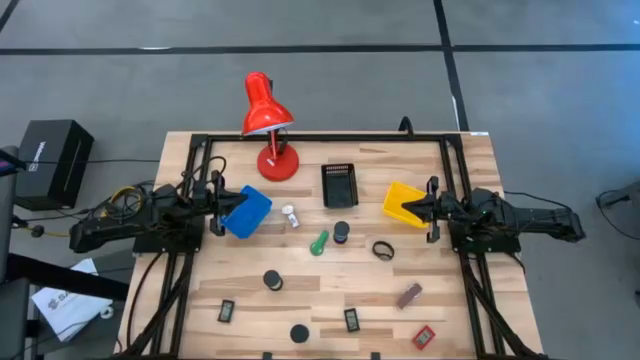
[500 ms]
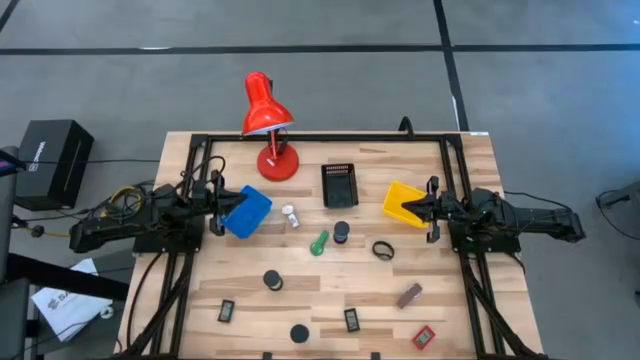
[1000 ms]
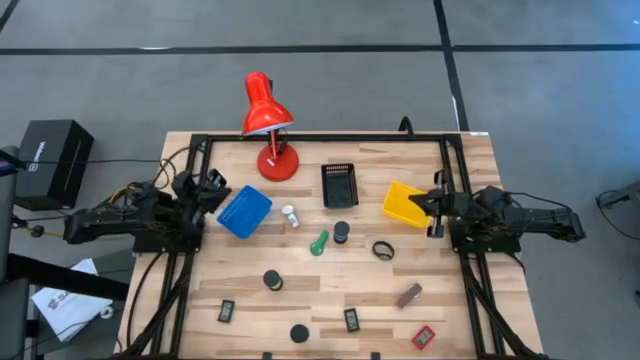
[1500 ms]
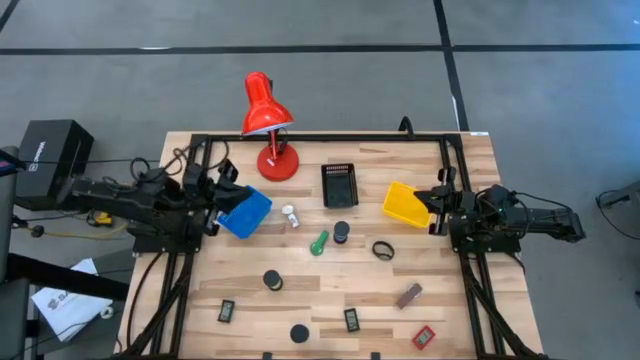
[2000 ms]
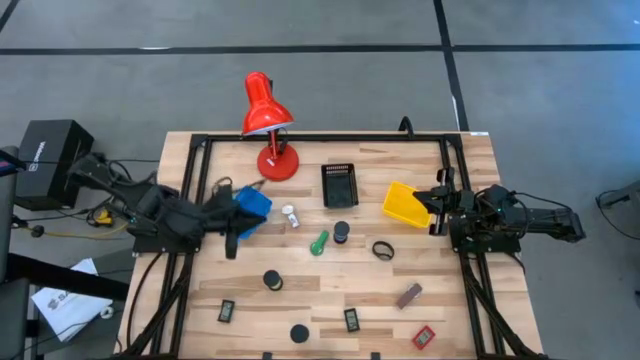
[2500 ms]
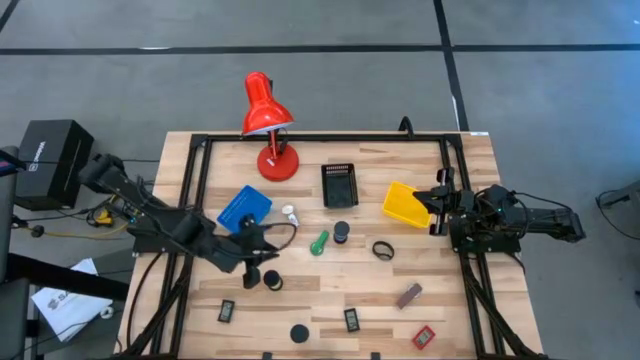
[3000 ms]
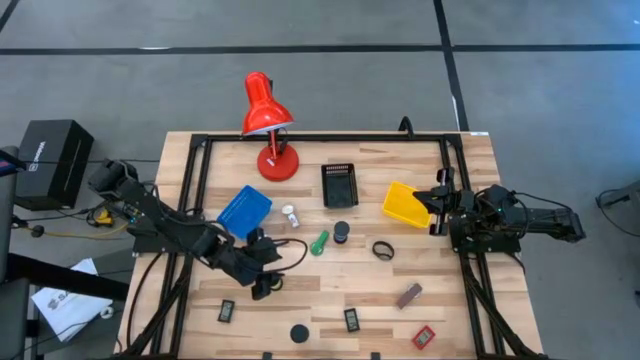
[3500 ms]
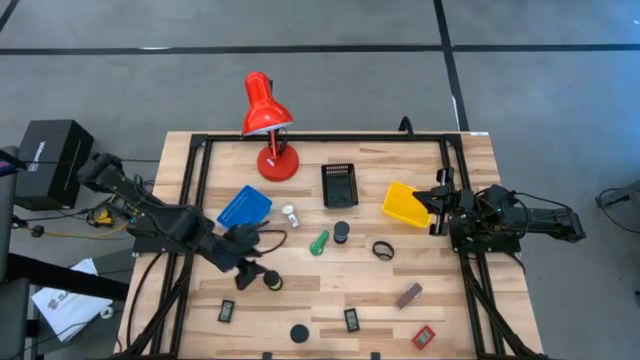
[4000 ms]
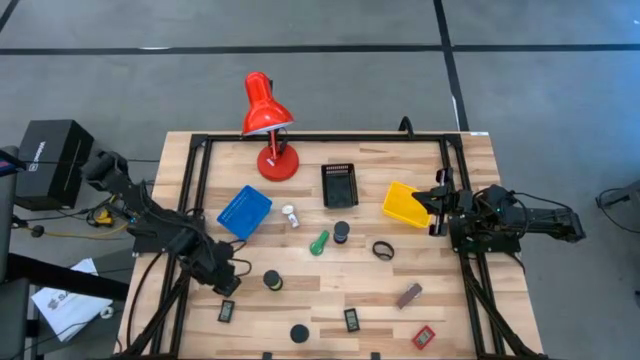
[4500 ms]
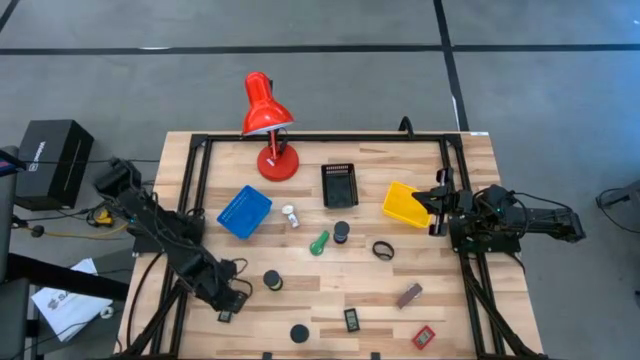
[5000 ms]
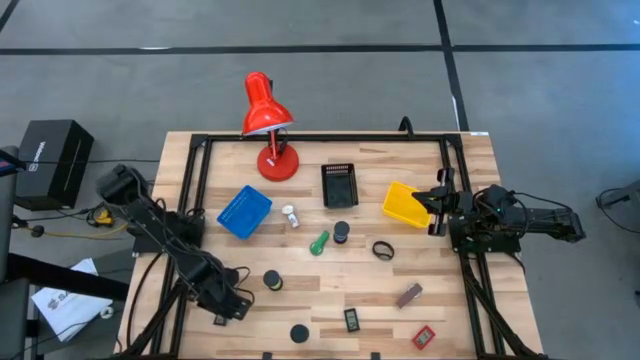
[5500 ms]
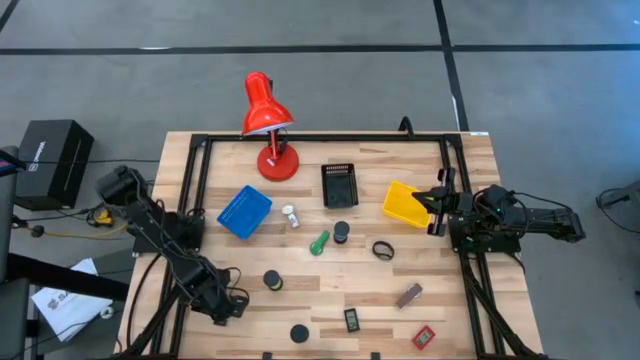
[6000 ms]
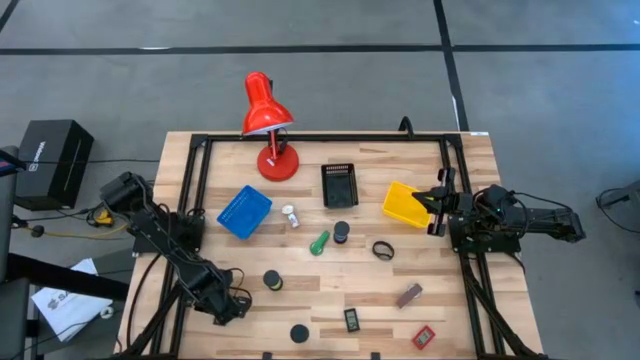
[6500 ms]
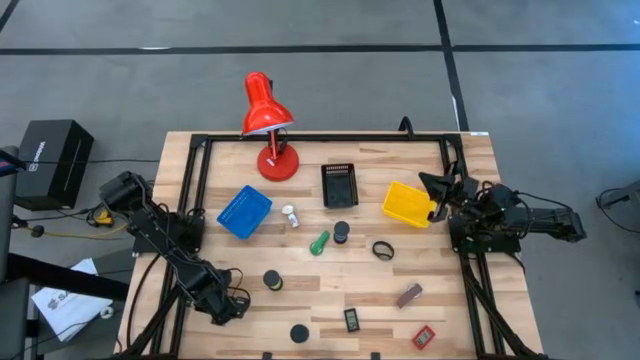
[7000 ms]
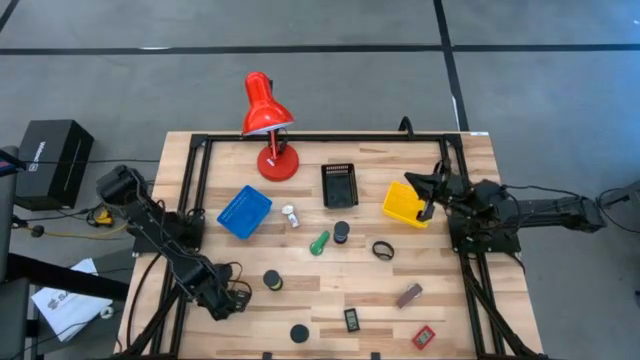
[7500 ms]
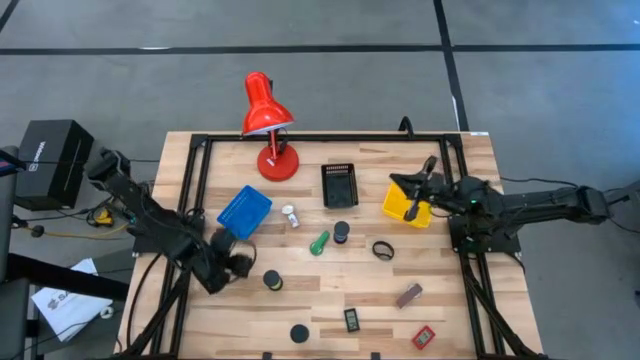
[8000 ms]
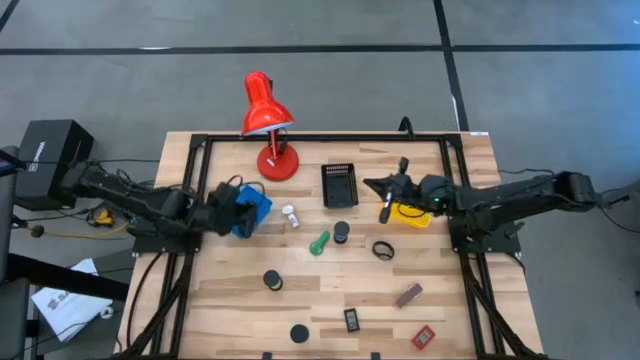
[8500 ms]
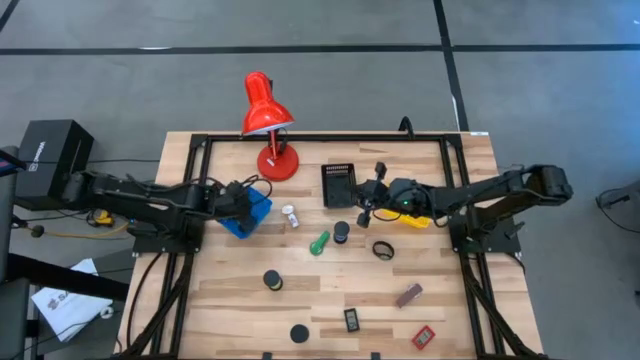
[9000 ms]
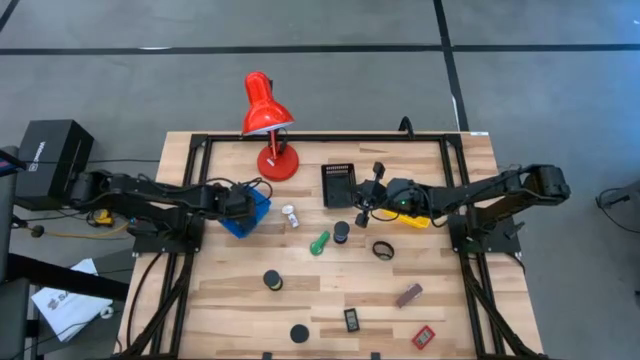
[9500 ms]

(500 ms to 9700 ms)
Task: Pick & Place Office items
Put the left black digital clock into the blue basket

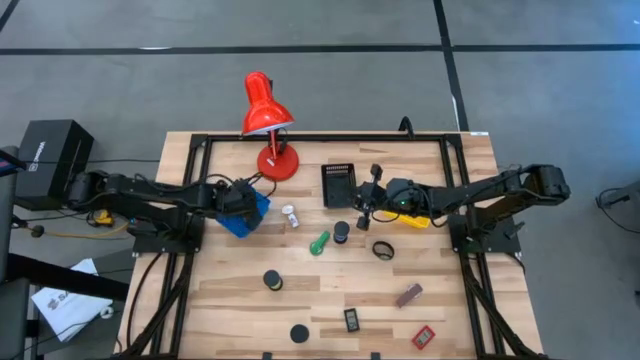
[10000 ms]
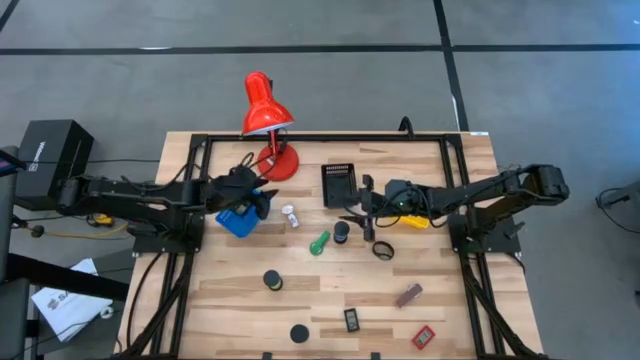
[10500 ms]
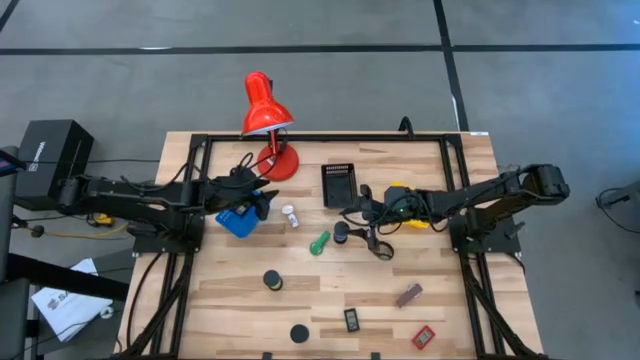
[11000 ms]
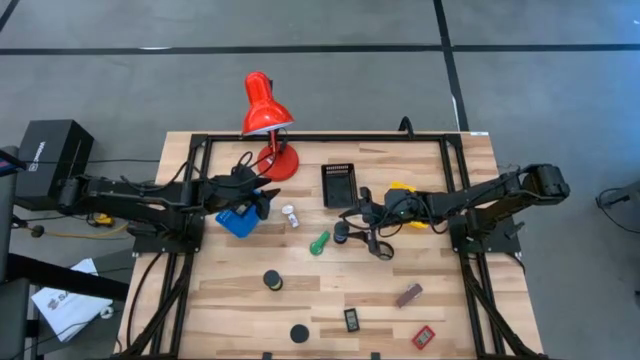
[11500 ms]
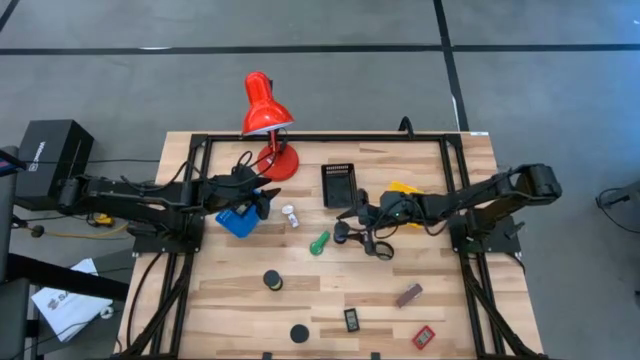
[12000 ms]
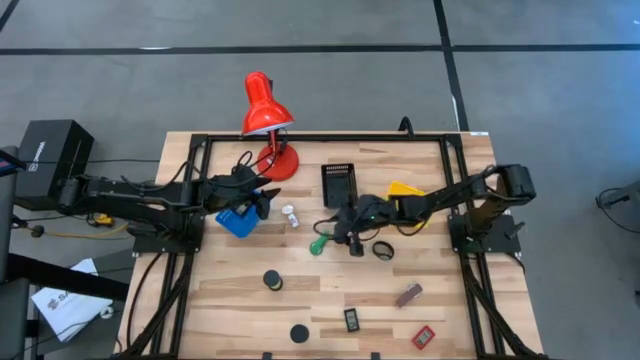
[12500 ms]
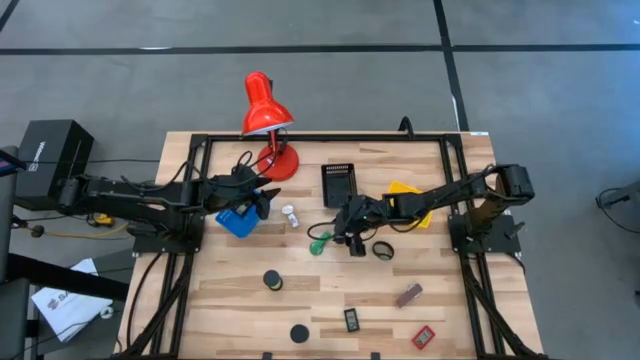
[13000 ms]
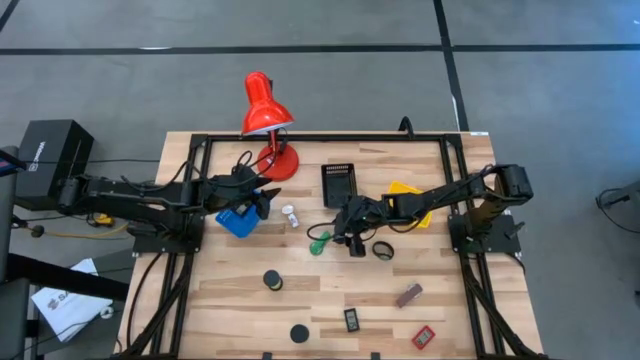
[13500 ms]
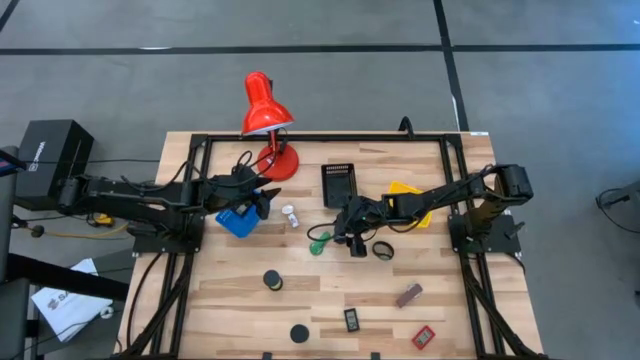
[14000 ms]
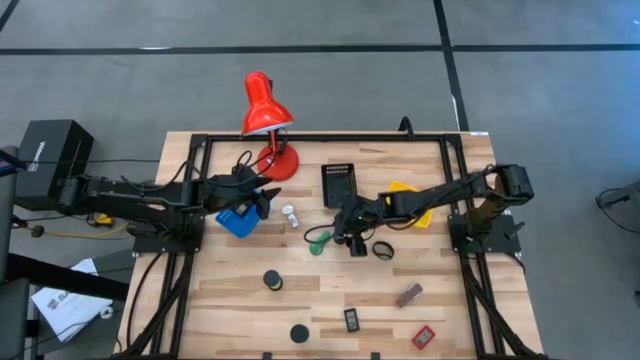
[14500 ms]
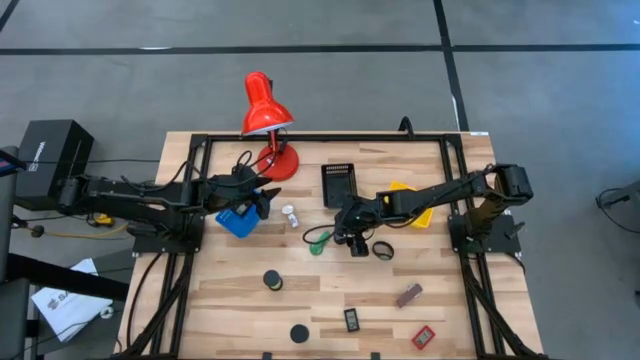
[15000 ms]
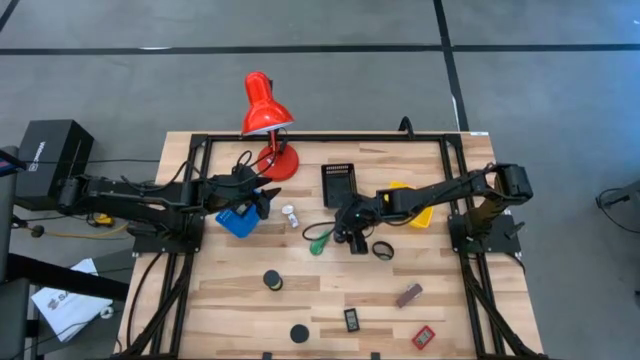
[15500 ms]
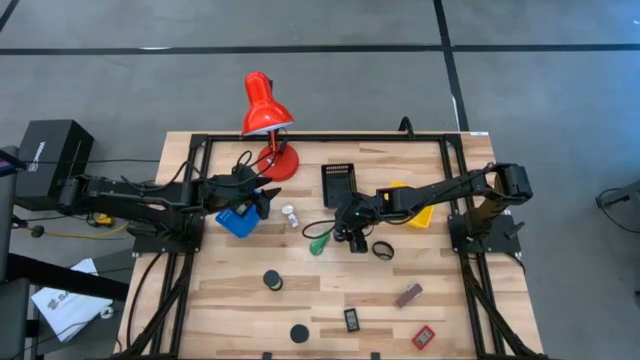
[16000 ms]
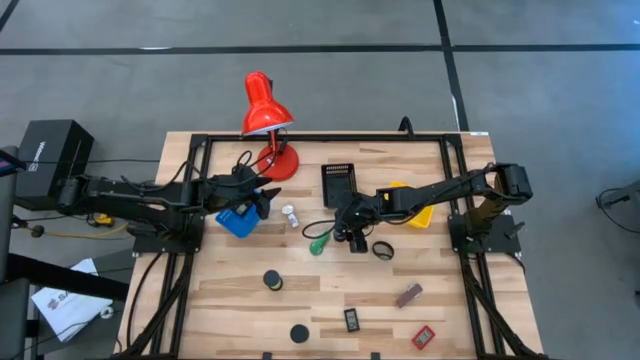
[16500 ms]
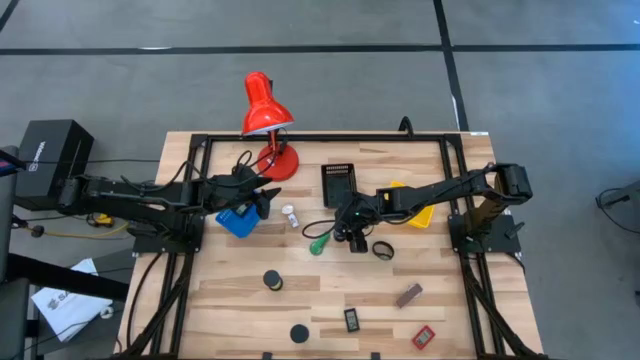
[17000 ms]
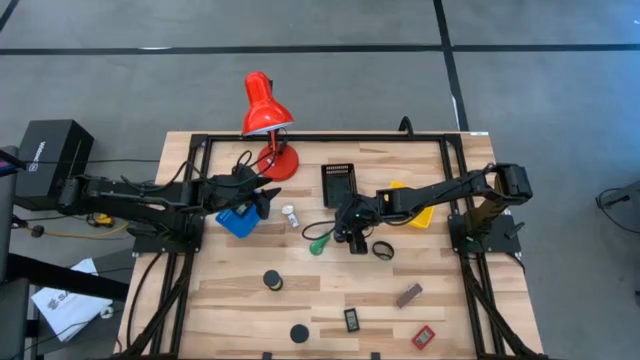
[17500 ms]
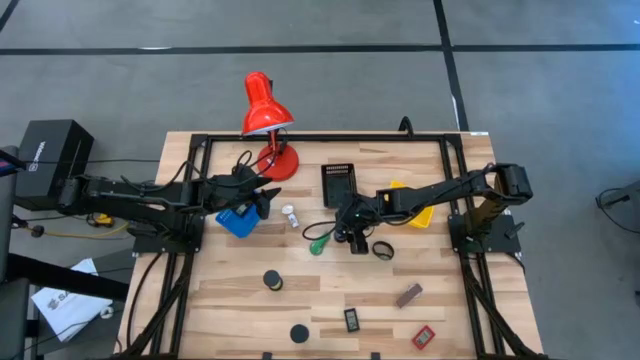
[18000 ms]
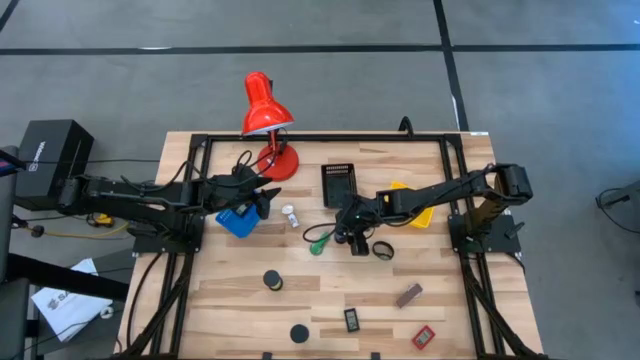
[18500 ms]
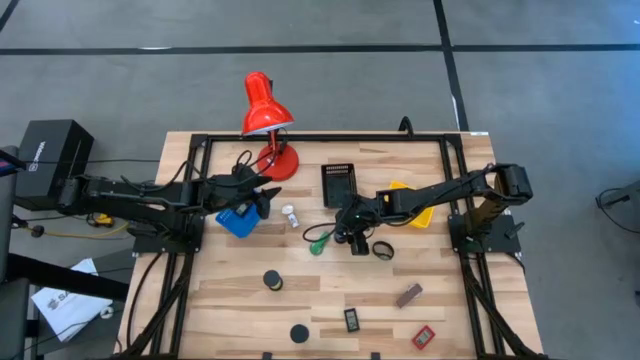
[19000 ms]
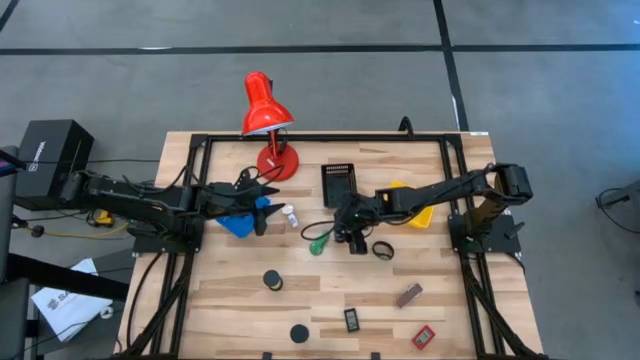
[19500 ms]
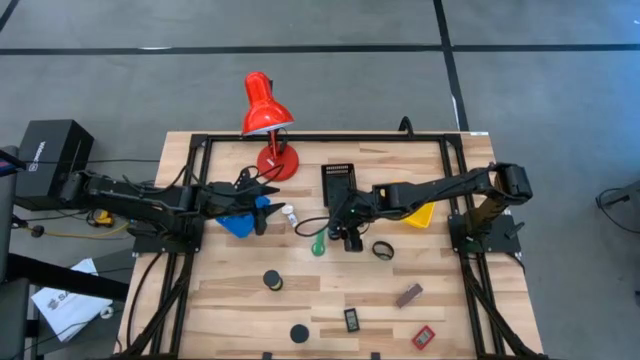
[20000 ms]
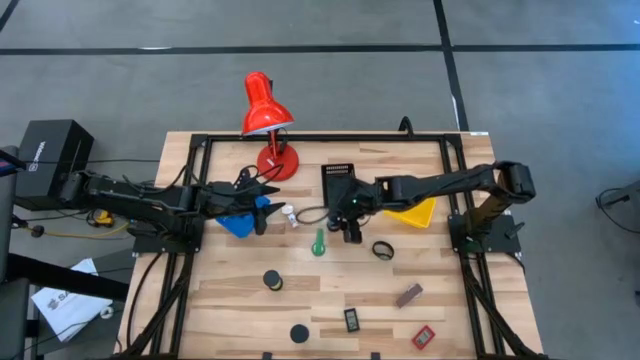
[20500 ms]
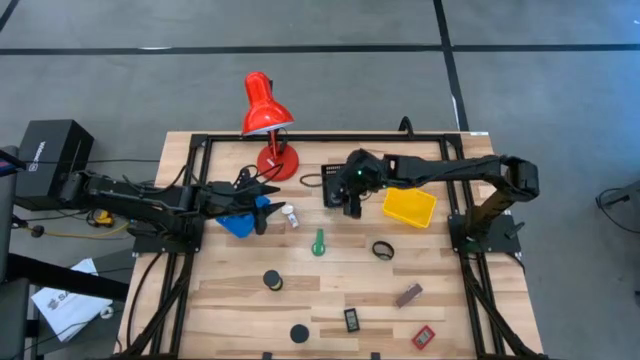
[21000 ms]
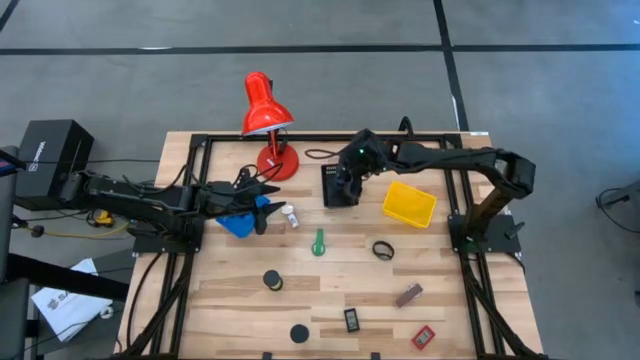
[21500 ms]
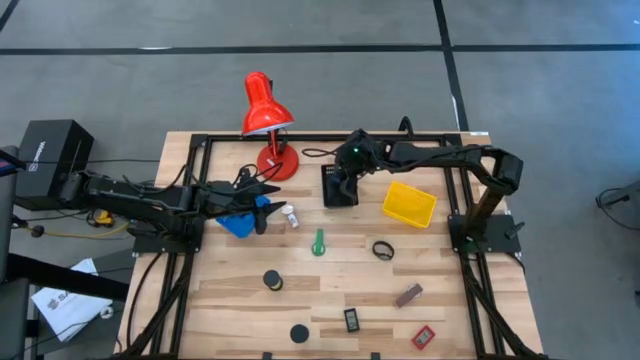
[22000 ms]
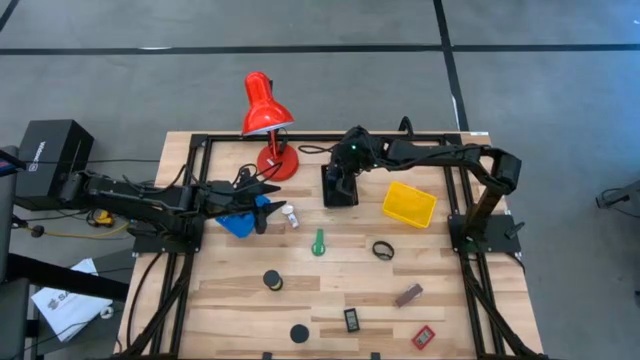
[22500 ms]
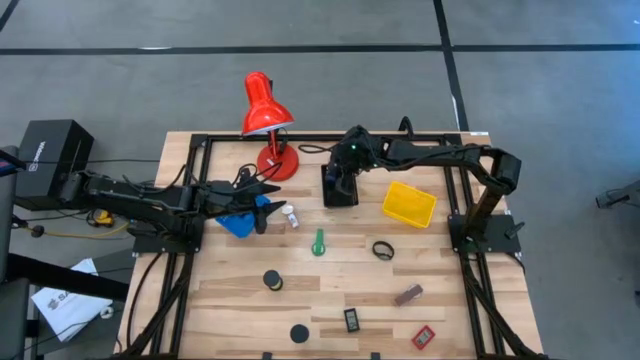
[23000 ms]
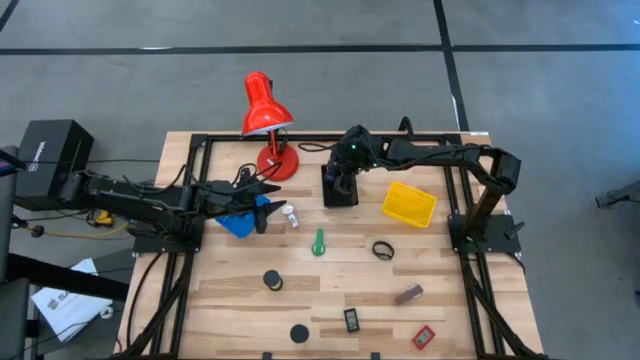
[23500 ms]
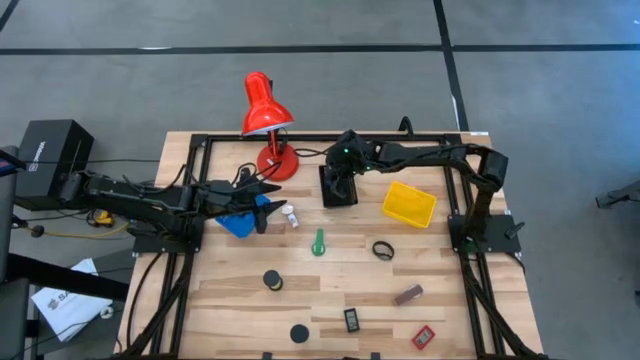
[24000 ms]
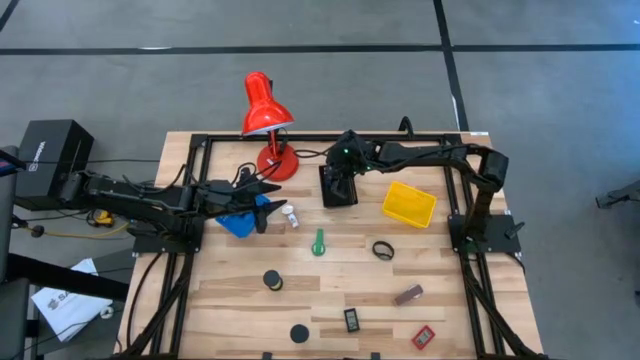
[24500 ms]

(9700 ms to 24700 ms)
Put the blue hourglass into the black basket
